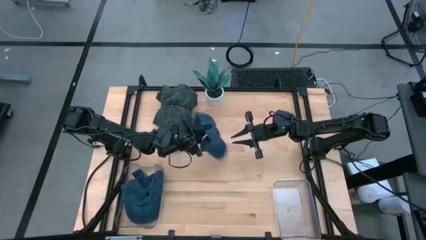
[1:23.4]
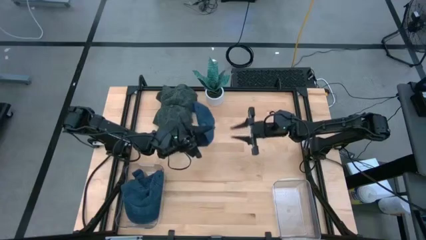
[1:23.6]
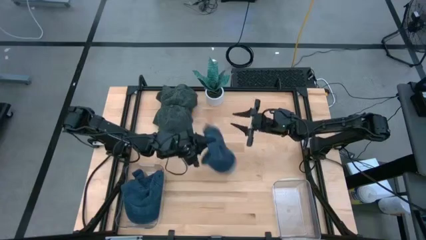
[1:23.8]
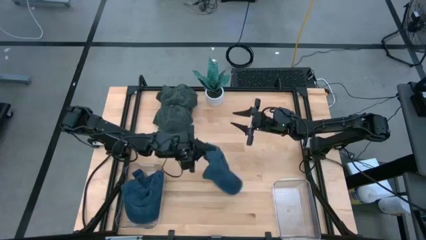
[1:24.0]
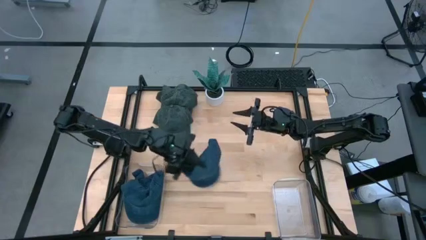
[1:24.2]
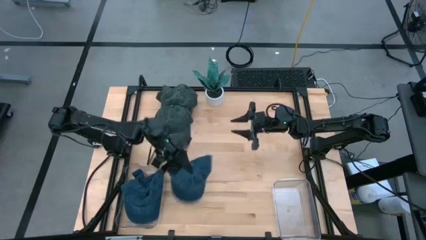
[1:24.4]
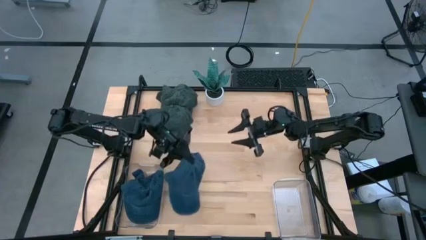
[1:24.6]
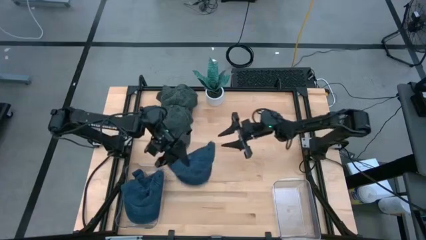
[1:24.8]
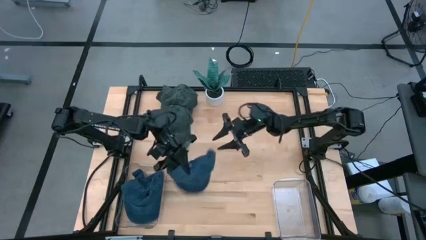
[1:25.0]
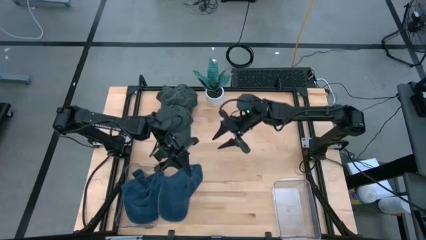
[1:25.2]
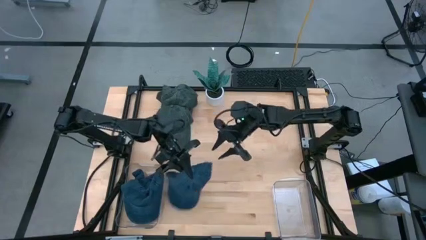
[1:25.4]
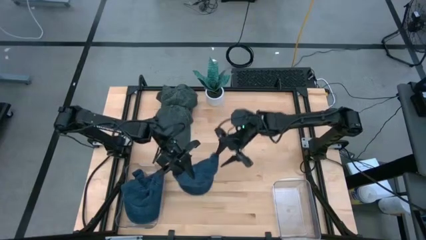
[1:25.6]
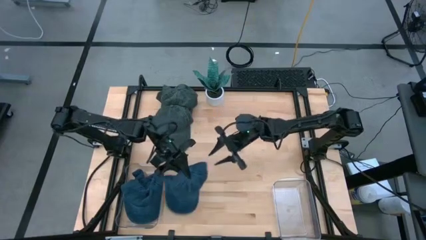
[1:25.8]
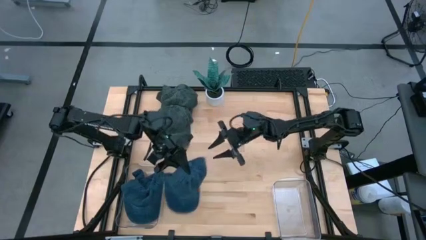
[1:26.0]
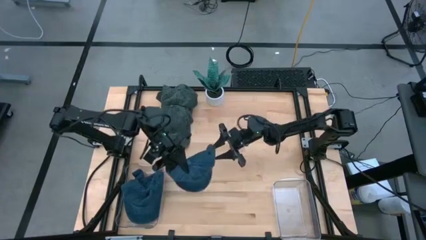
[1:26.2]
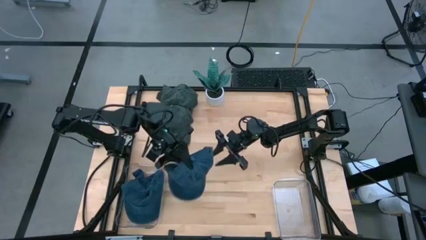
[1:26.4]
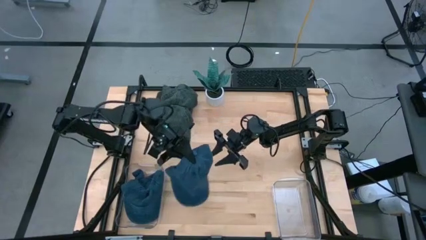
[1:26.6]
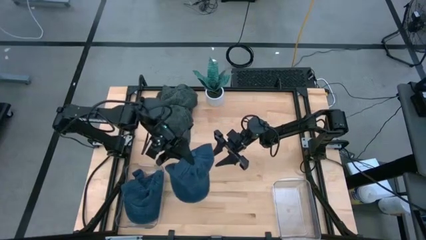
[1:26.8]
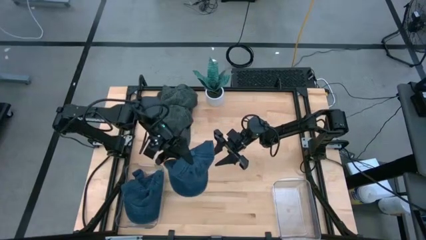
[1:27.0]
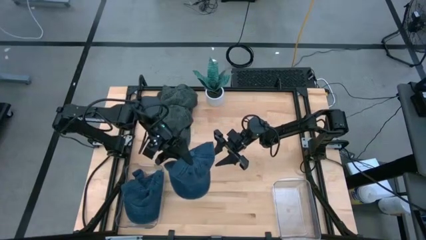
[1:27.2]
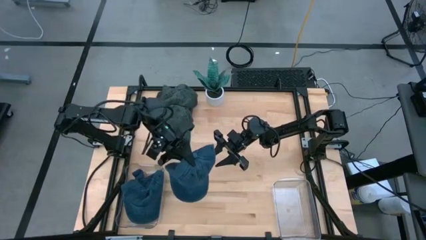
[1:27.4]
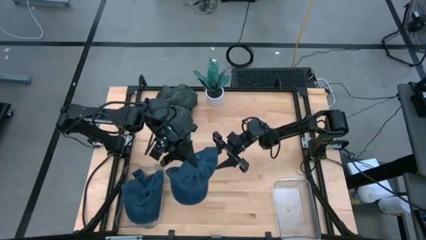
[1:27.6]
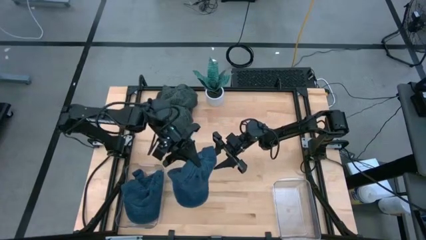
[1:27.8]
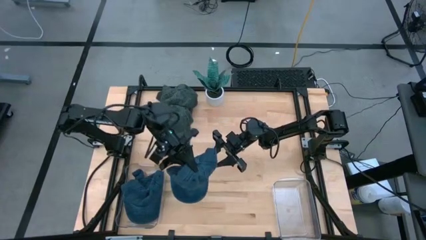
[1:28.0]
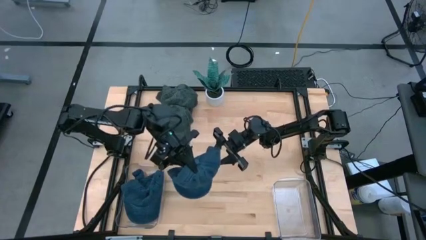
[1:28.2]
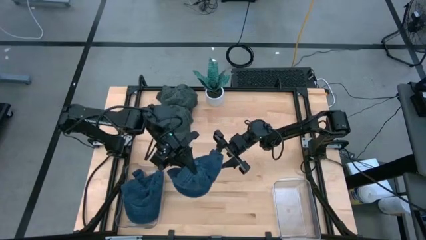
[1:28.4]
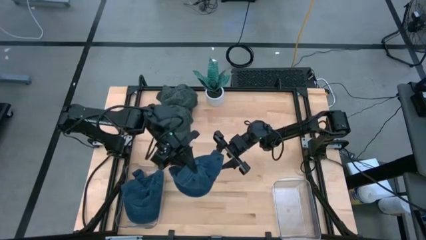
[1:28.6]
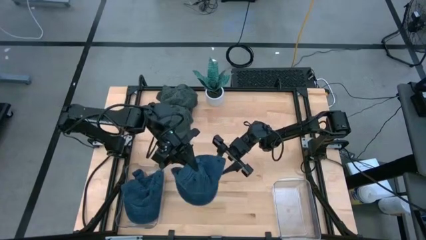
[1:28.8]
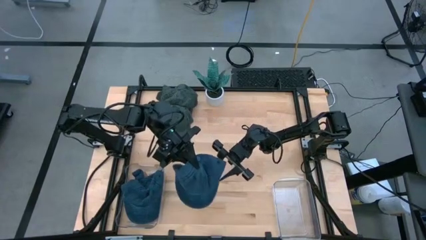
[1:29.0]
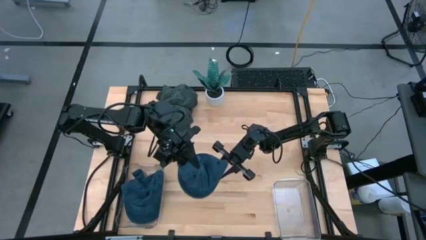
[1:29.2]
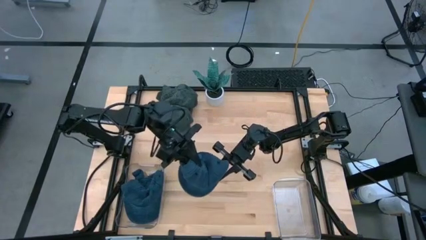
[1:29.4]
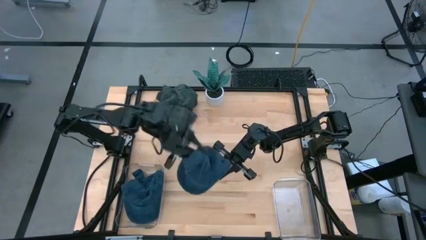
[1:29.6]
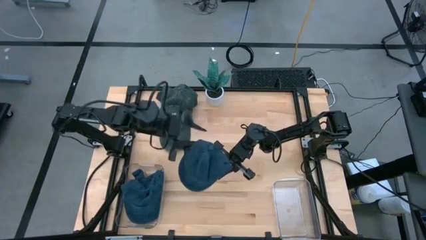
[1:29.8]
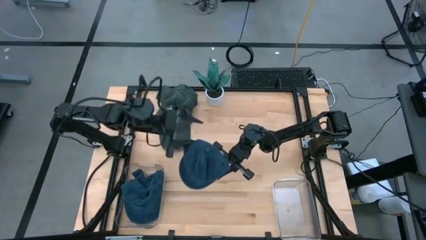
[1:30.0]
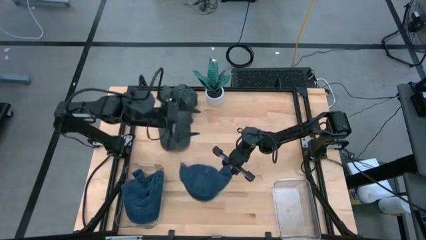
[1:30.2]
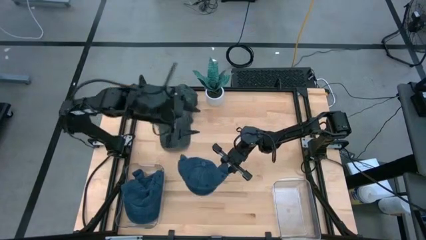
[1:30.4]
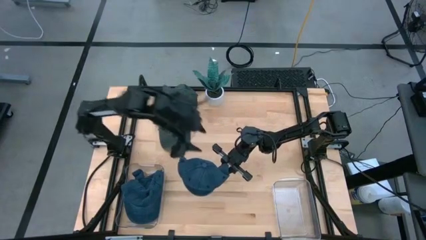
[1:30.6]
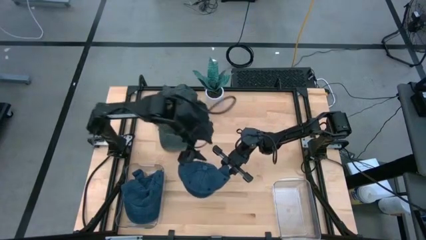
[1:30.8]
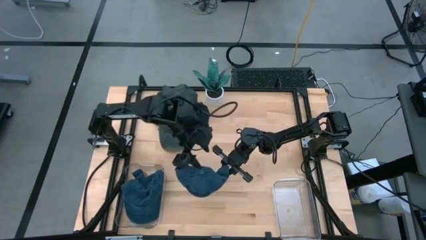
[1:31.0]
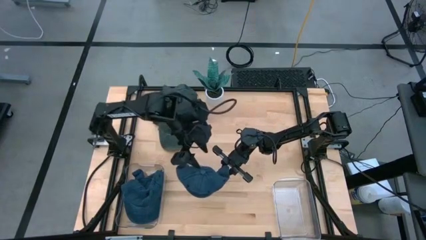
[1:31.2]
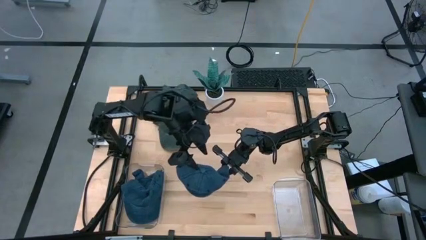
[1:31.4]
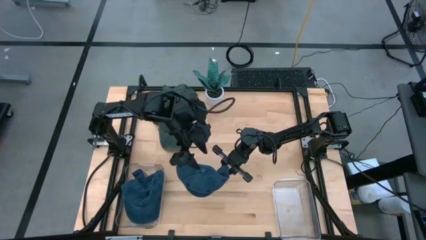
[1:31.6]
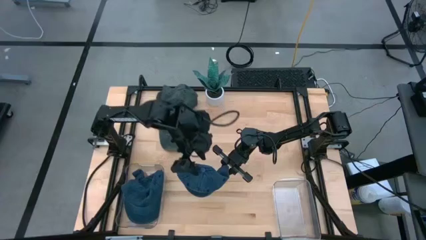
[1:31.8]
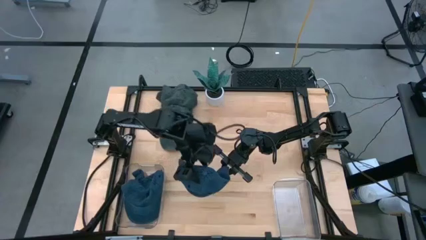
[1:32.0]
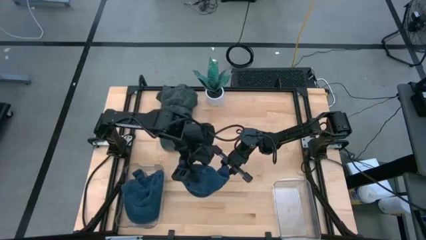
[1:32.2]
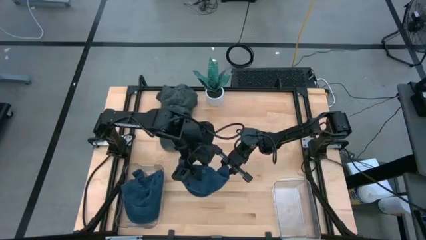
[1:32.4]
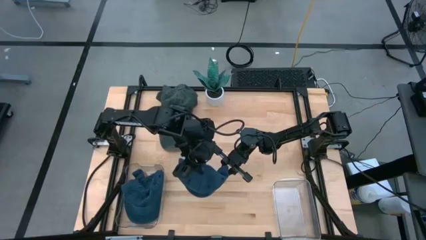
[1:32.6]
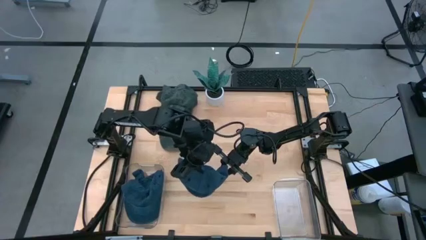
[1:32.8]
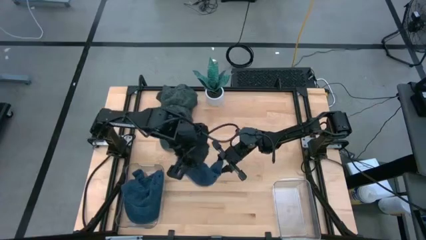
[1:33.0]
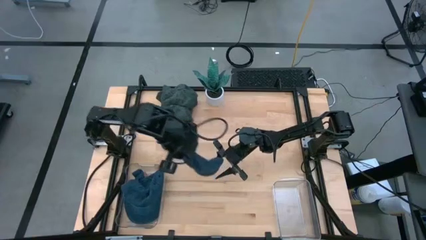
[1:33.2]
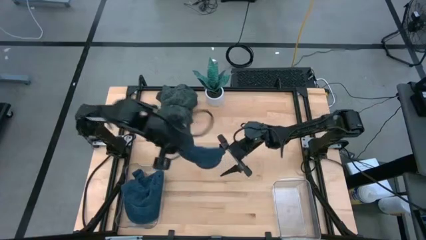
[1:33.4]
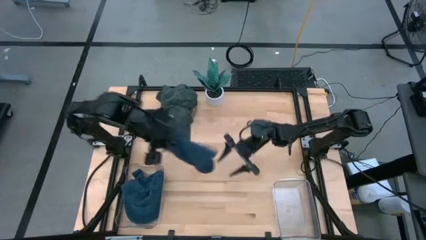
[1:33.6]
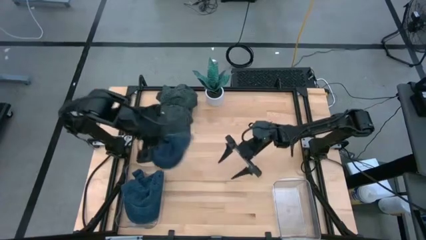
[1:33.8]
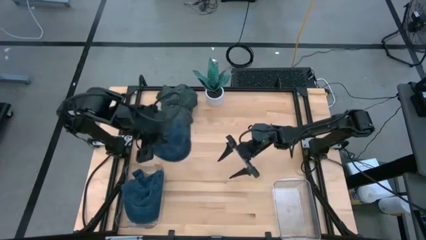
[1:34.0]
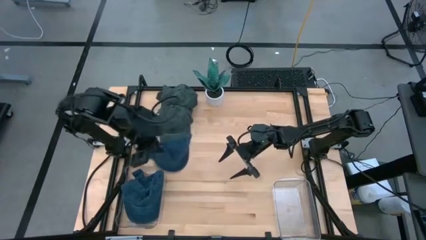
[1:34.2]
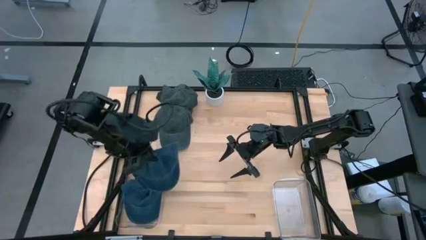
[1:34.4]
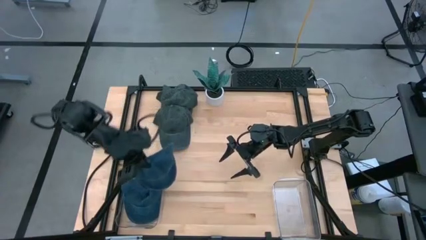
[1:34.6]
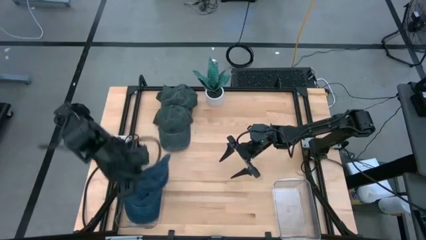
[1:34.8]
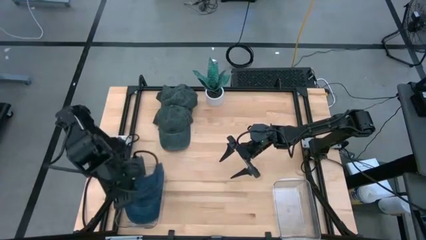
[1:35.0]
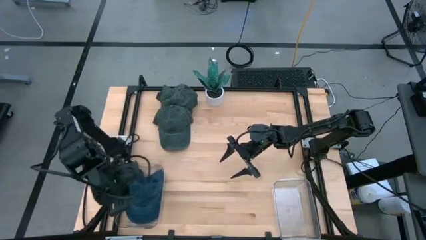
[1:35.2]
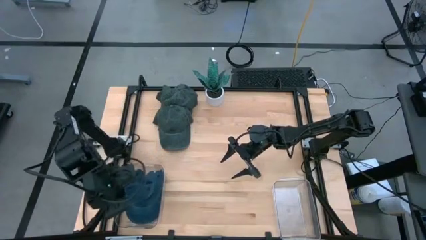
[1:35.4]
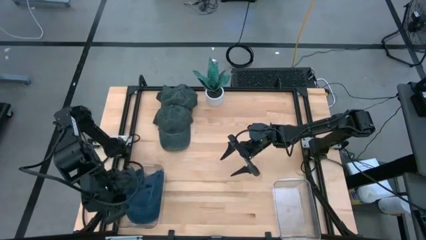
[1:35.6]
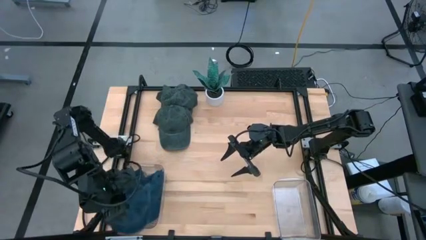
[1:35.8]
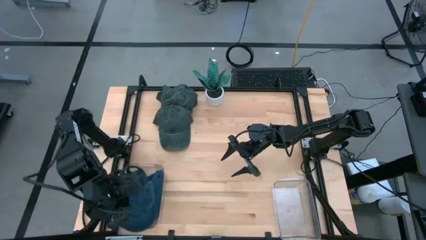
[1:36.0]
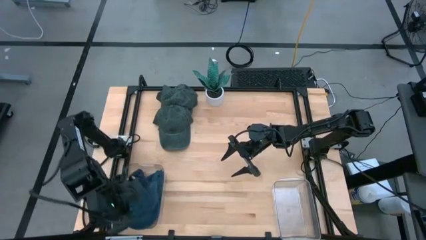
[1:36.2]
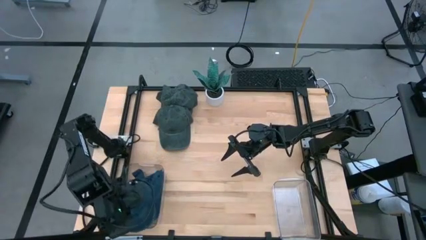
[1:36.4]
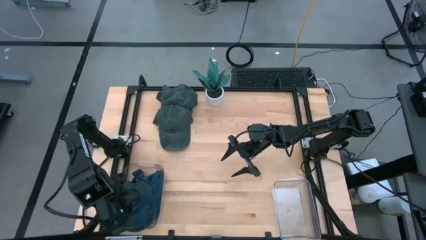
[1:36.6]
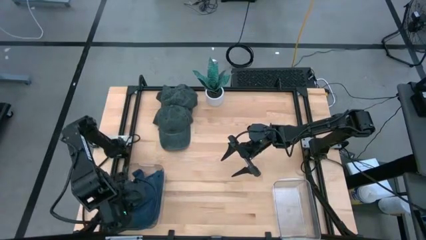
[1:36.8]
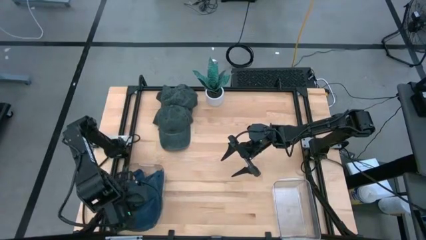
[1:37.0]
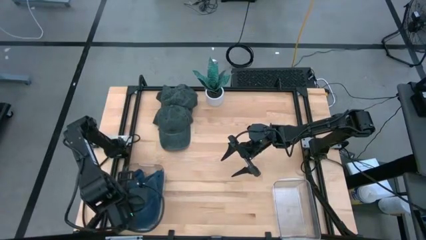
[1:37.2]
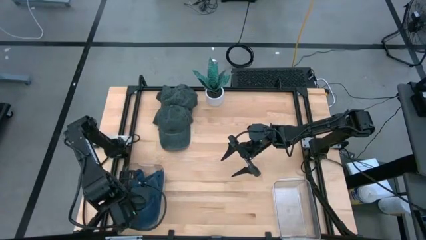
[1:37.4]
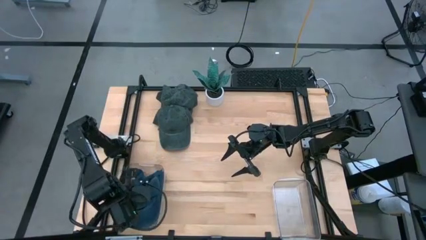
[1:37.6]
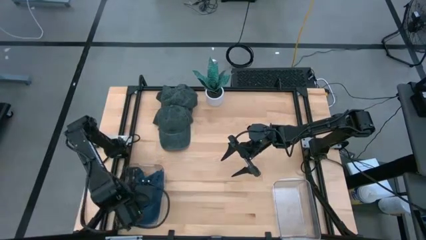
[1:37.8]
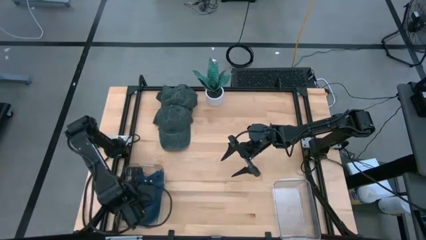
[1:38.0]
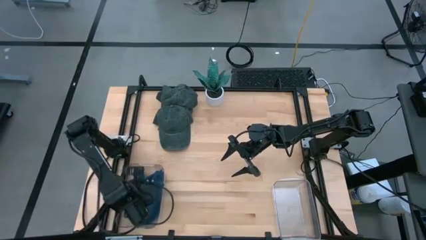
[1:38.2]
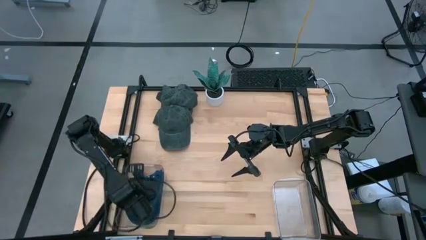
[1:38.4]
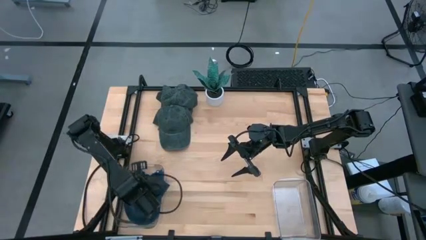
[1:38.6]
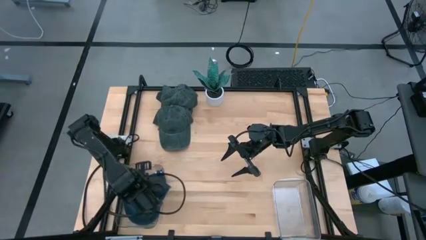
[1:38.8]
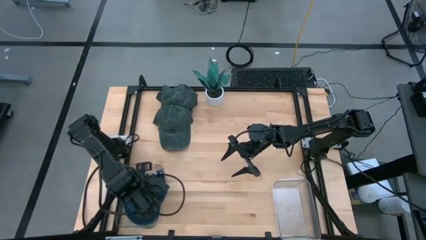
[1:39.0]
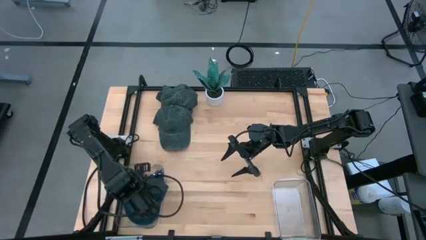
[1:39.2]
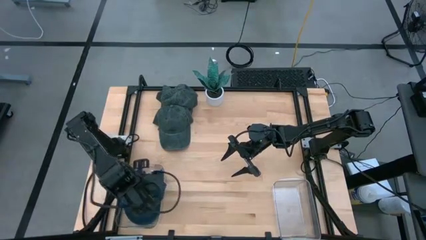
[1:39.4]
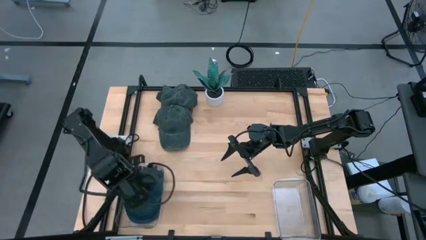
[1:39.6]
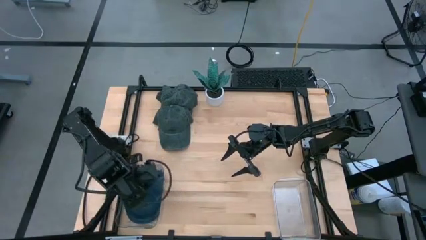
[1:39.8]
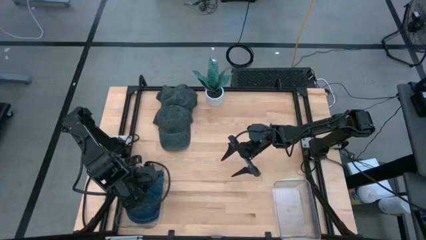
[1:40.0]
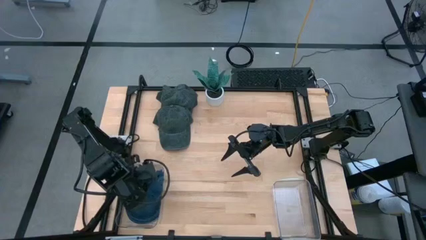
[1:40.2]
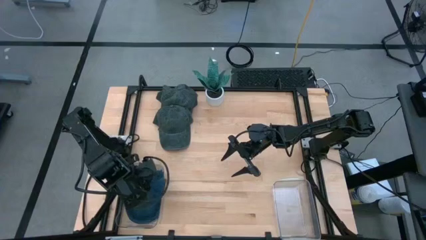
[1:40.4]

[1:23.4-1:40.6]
Task: Pick & Place hat
Put the blue cap into the left transparent bin
